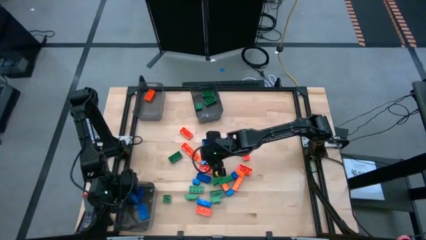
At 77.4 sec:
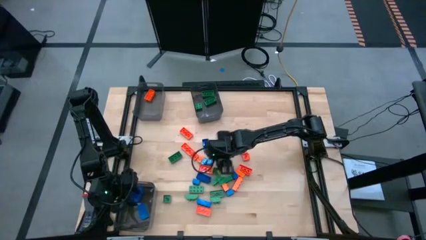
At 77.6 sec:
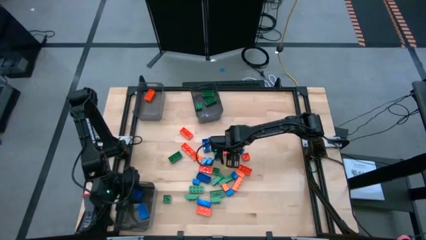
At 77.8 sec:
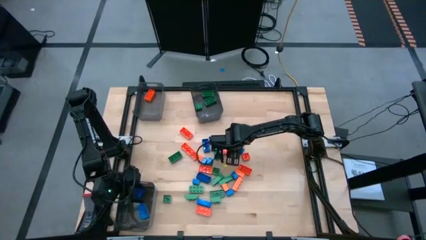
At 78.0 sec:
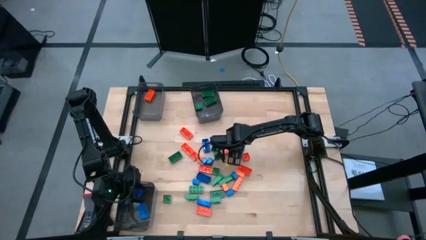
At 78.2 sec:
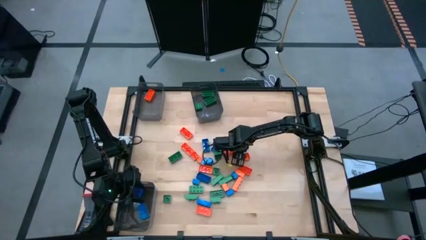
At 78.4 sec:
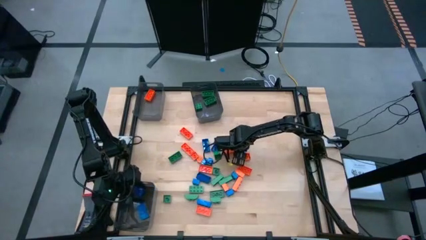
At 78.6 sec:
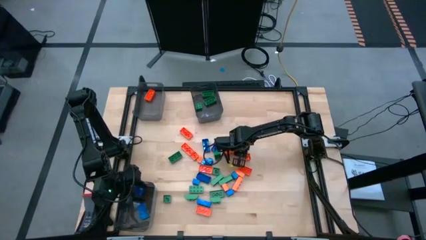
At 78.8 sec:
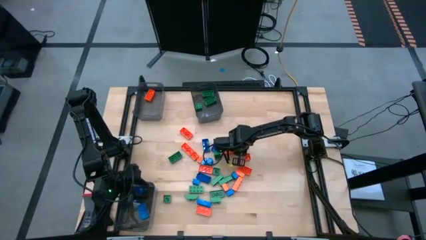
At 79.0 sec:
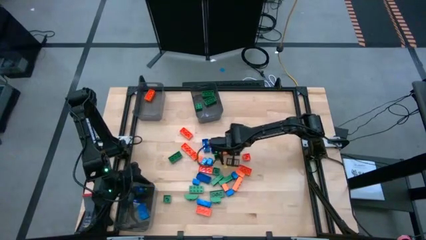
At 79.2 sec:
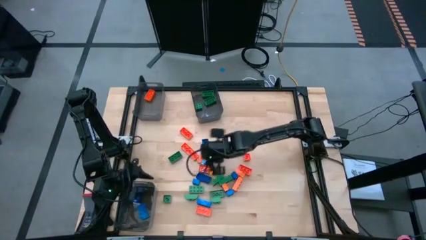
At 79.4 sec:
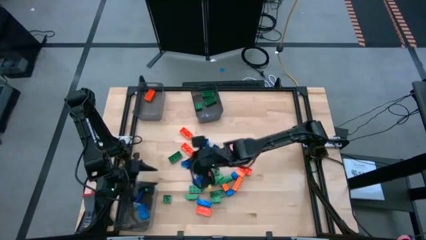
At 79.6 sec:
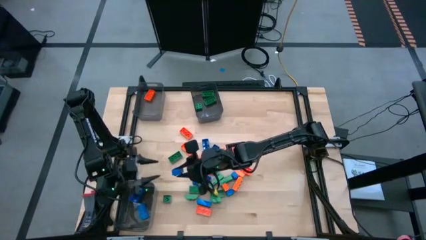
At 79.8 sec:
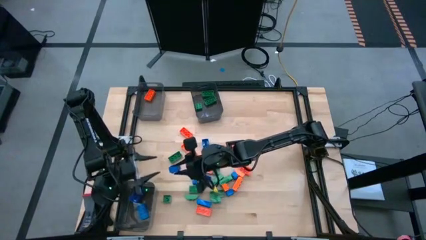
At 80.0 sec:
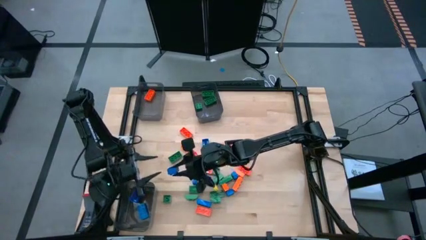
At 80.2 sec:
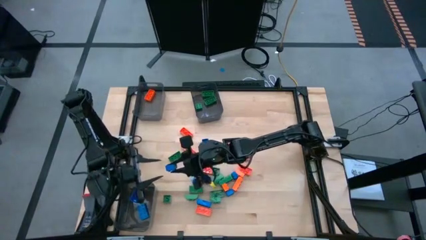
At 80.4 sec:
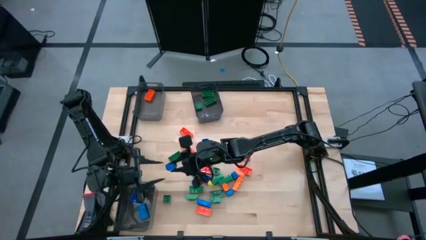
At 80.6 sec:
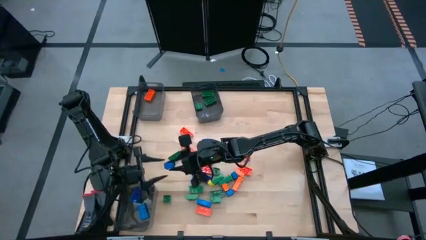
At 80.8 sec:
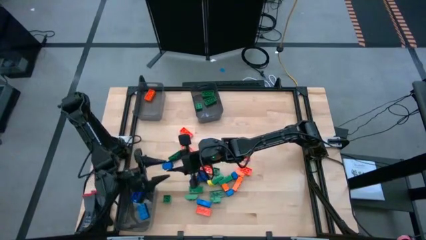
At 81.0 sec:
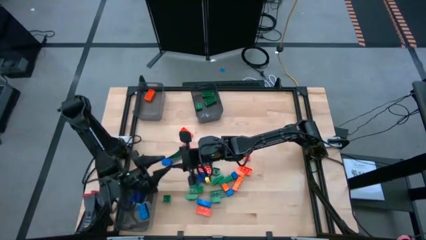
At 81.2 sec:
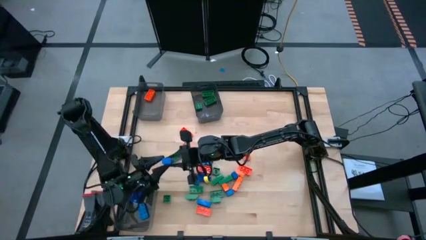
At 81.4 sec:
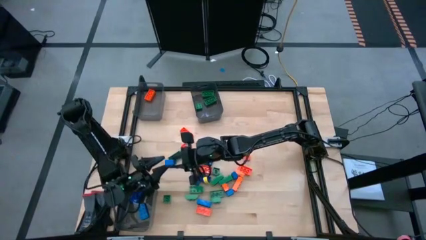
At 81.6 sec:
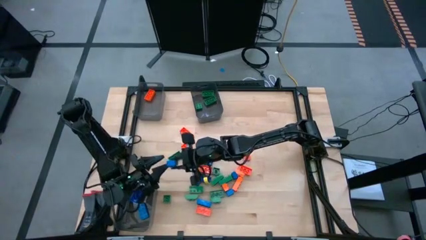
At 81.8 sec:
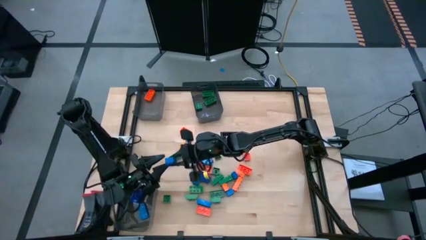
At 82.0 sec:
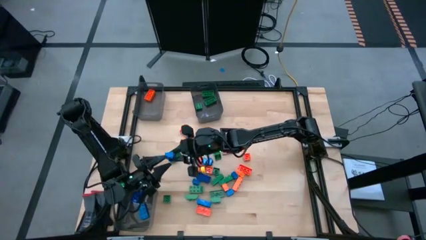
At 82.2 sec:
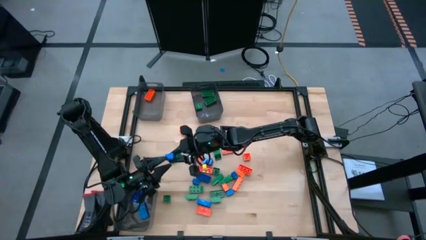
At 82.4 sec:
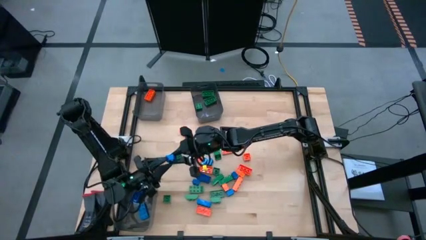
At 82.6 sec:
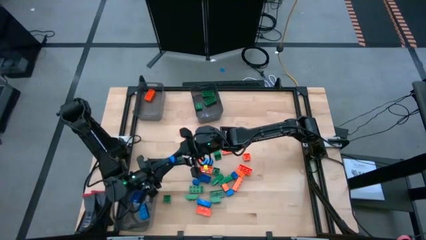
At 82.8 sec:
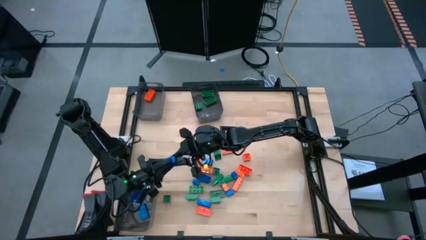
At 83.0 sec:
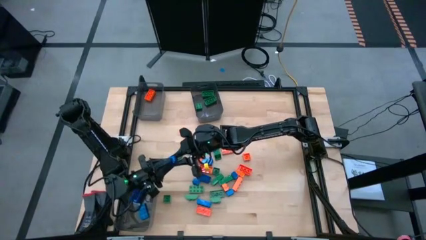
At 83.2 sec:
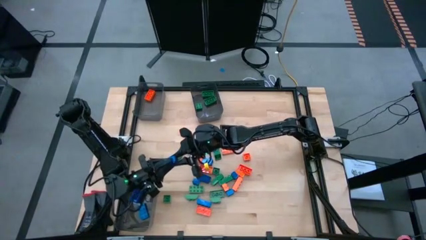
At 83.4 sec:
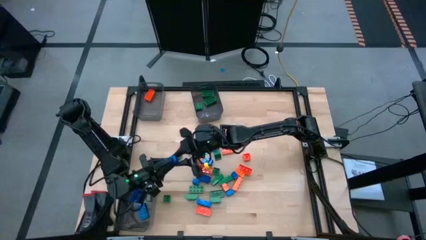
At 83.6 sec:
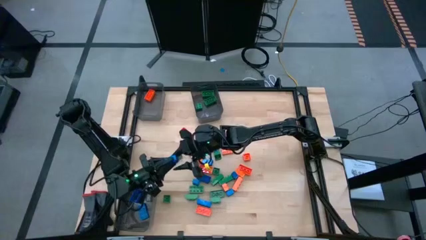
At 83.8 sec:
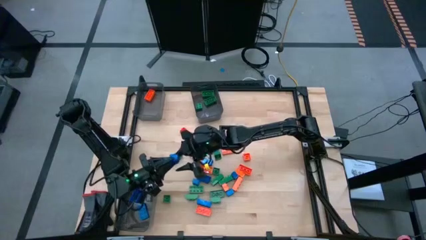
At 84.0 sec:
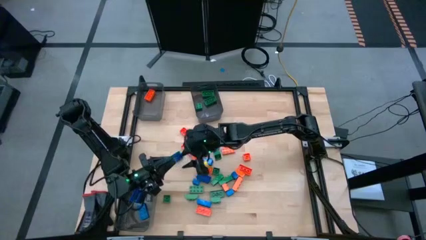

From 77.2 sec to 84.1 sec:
Task: Sort blocks
Put the blue game piece into the bottom left black transparent bin

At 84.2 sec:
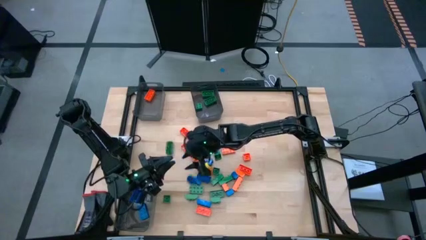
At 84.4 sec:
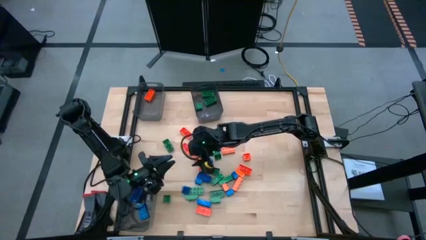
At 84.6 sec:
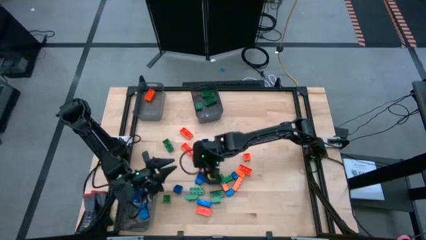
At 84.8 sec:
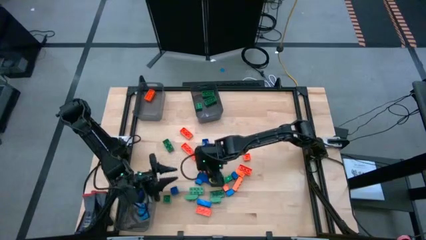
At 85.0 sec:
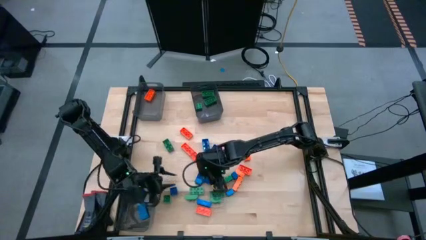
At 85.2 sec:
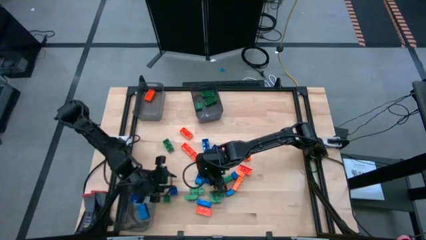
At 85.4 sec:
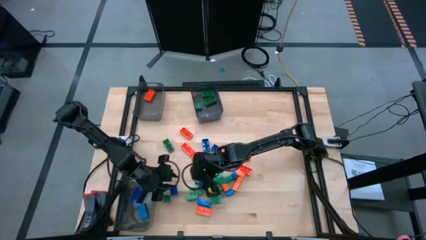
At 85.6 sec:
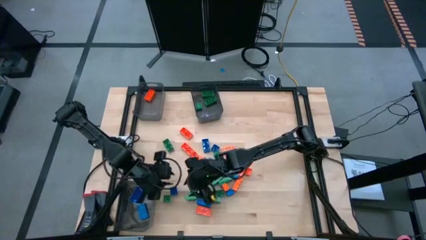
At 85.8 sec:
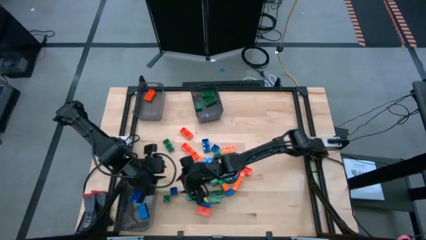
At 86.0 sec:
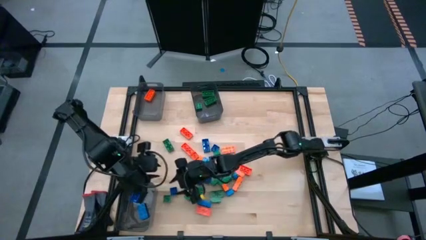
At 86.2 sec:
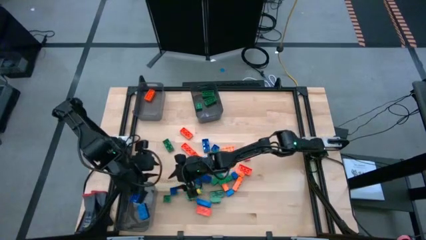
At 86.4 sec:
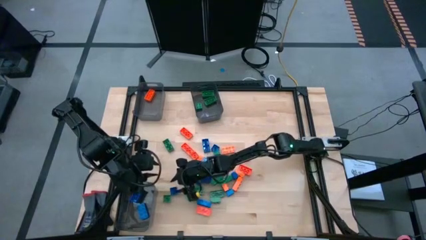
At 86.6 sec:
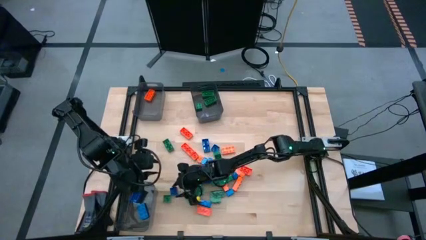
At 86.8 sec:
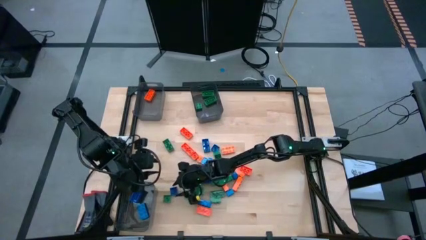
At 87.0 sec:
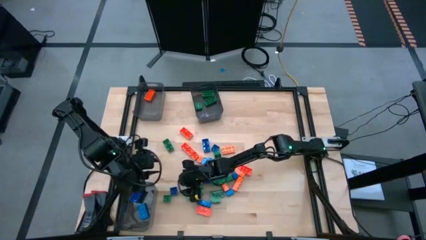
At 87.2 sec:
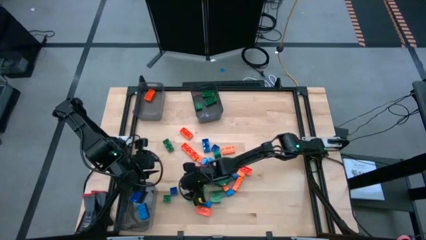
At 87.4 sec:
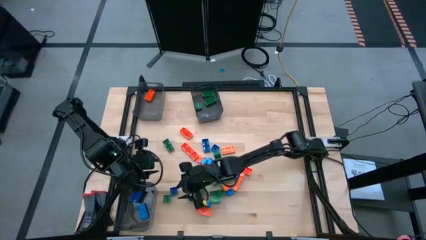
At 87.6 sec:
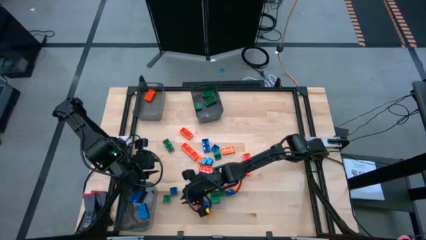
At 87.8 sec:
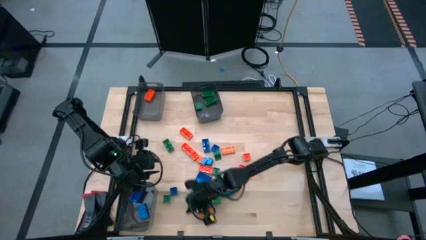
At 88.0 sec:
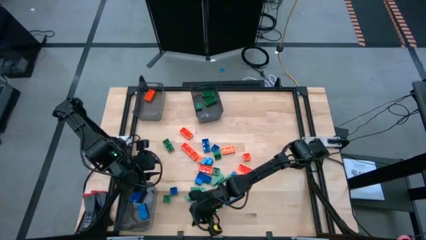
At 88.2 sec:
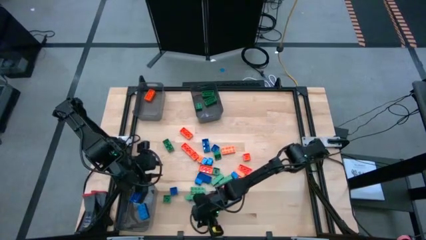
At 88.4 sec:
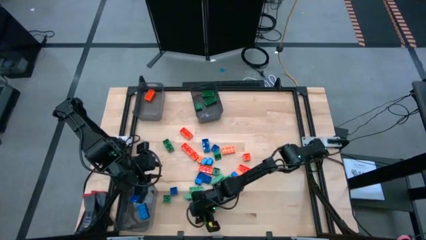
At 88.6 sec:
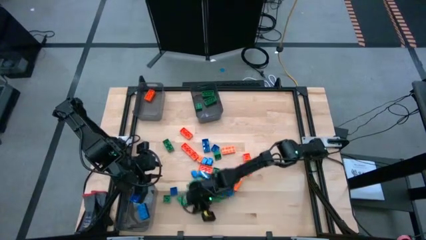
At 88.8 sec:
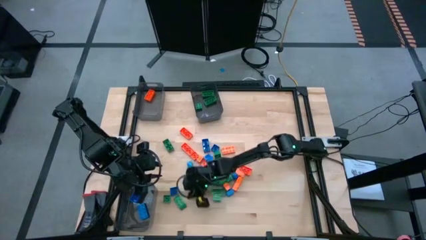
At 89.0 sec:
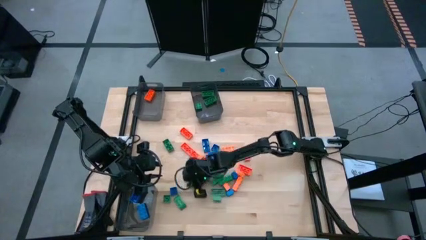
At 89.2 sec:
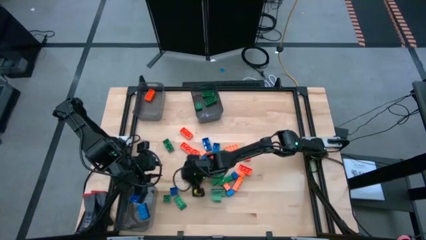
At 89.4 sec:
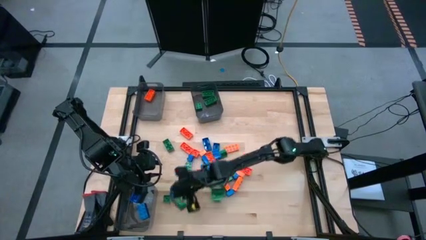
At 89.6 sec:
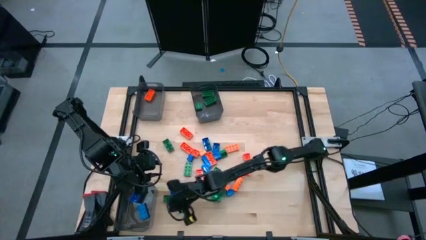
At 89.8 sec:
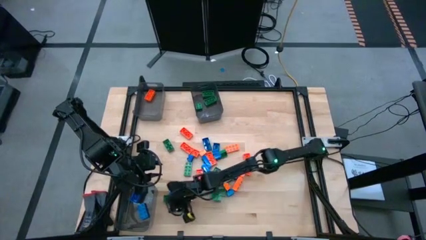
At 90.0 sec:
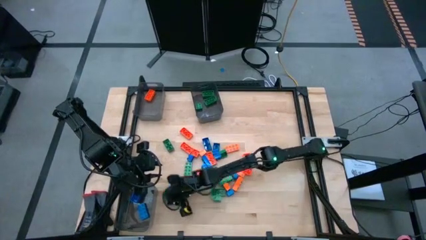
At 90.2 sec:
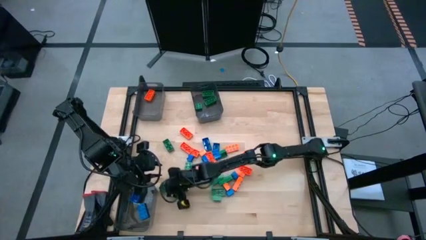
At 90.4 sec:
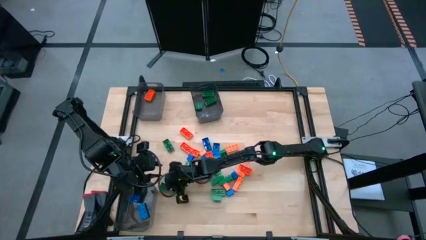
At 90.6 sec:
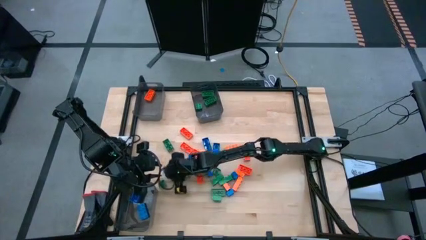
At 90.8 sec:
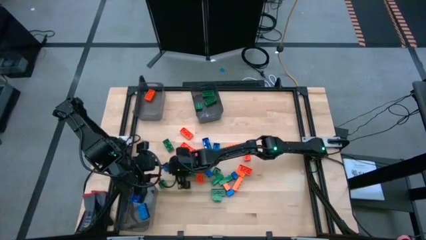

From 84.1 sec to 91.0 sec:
Adjust the game pieces on the table

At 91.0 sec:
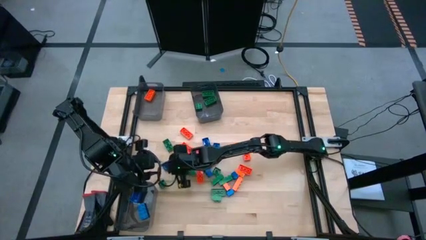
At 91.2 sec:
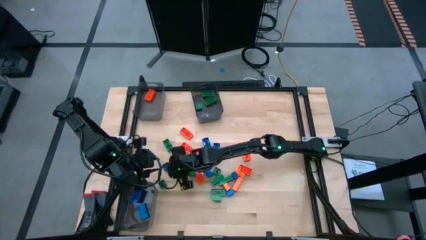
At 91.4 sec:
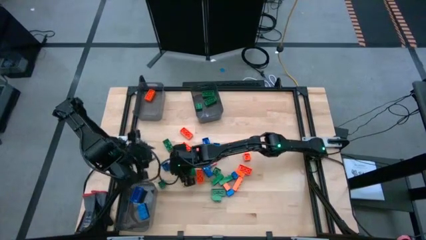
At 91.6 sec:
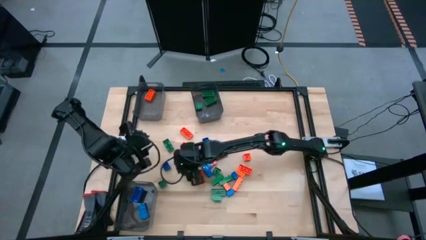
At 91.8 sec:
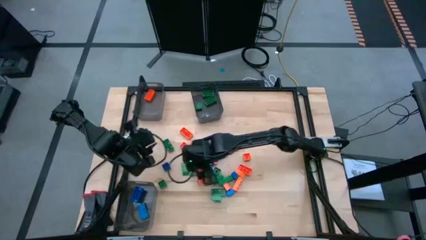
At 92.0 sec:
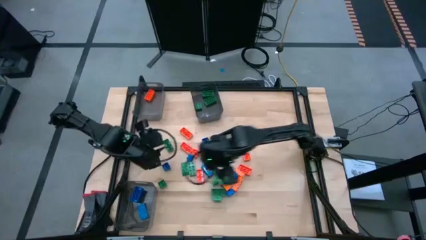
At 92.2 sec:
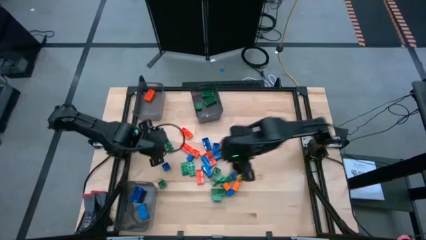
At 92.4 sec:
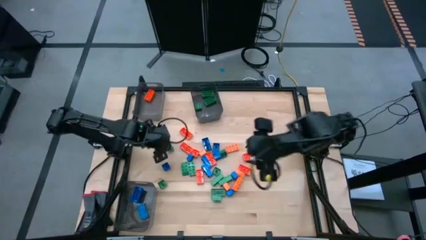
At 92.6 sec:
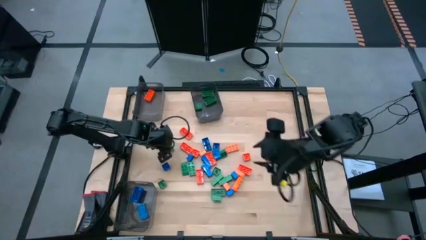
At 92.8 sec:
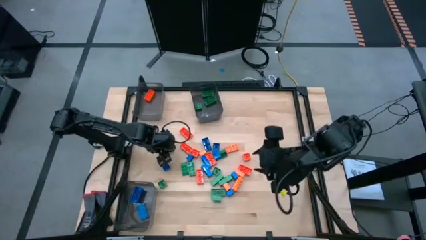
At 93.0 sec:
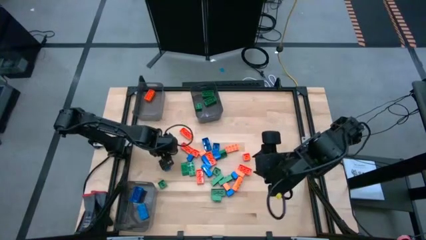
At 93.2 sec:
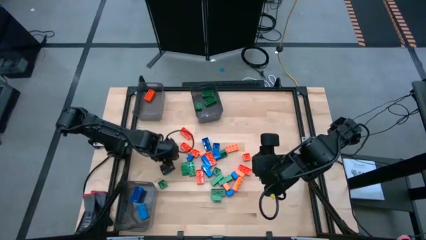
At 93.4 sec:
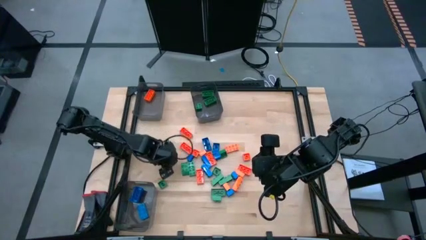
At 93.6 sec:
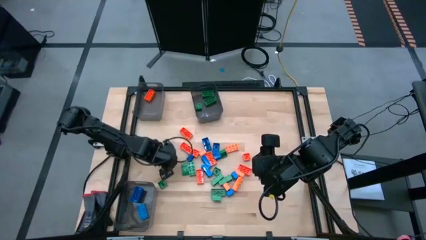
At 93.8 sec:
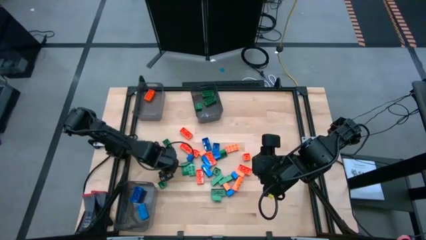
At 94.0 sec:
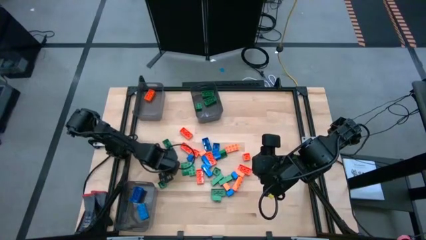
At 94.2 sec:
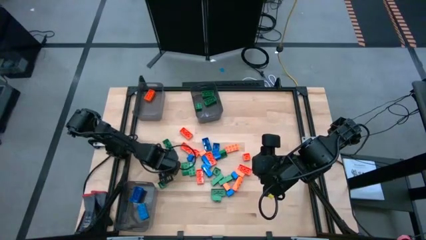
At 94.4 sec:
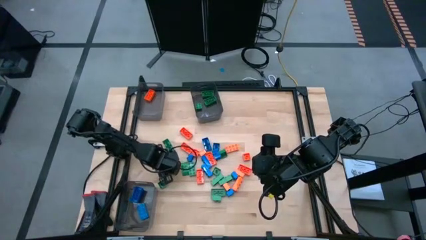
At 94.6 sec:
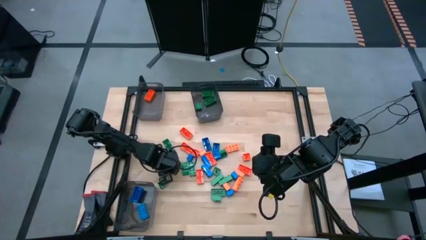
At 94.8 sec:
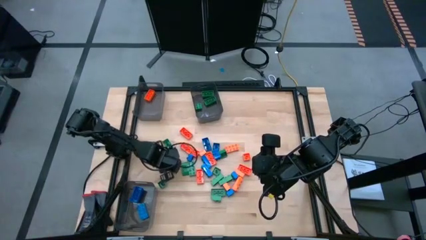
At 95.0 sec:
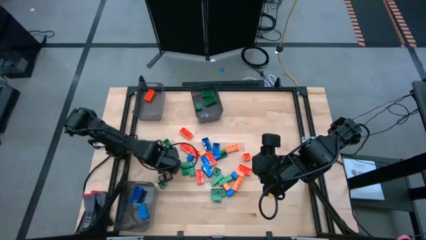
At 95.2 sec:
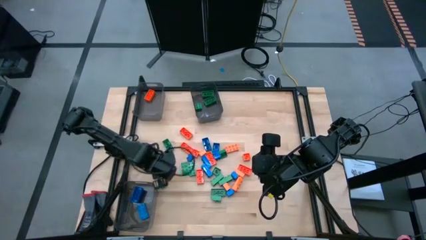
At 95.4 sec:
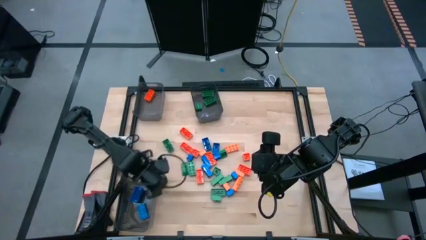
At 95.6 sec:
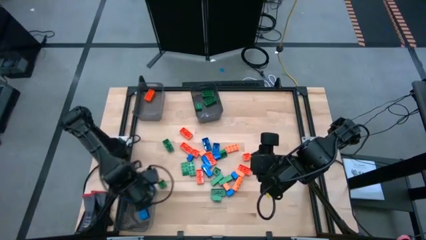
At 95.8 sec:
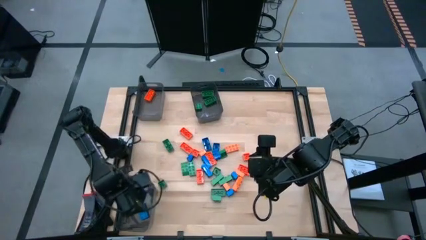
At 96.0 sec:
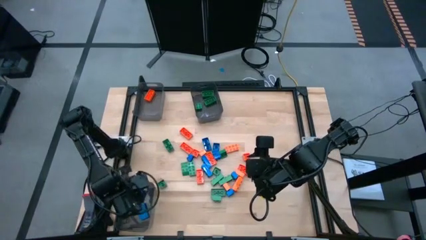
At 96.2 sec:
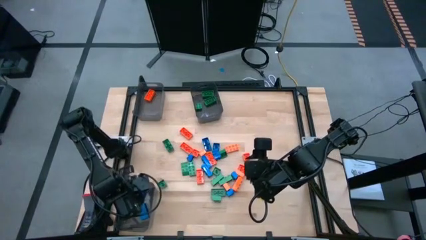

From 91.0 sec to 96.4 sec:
Put the blue game piece into the bottom left black transparent bin
